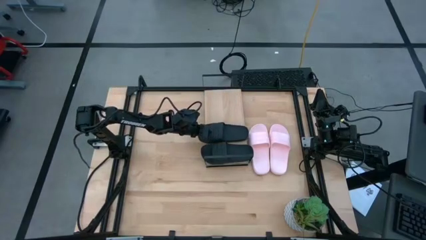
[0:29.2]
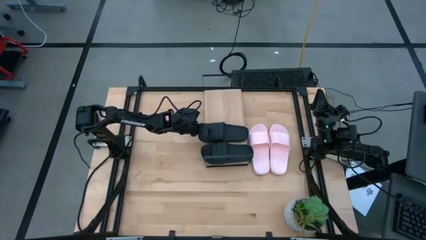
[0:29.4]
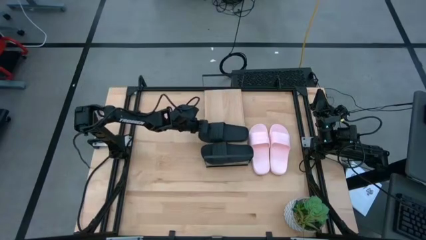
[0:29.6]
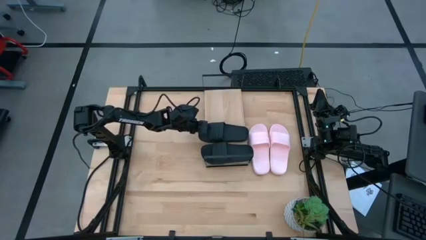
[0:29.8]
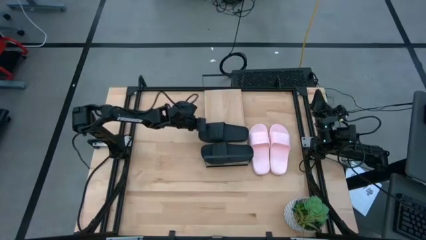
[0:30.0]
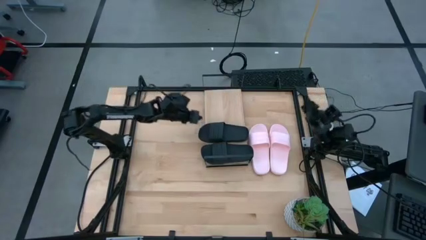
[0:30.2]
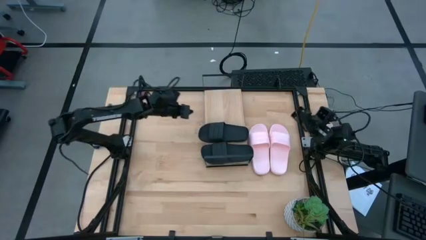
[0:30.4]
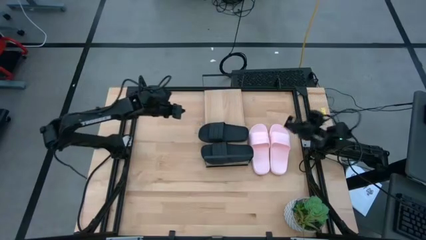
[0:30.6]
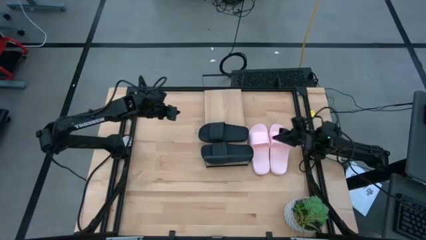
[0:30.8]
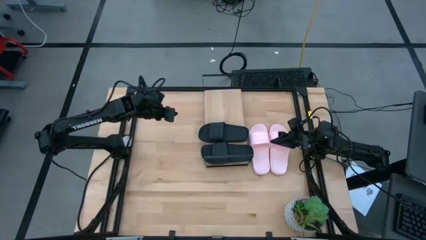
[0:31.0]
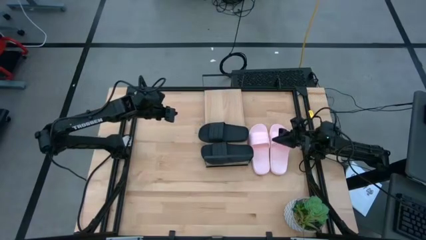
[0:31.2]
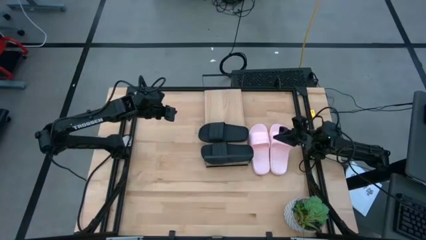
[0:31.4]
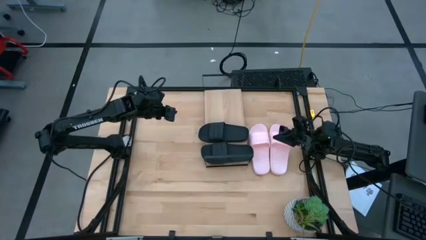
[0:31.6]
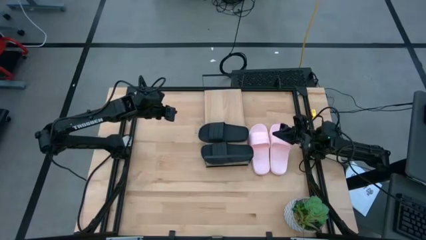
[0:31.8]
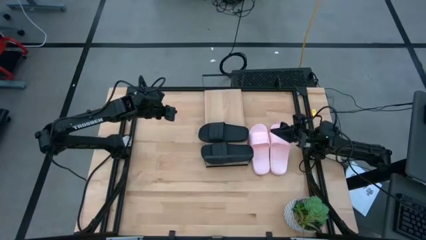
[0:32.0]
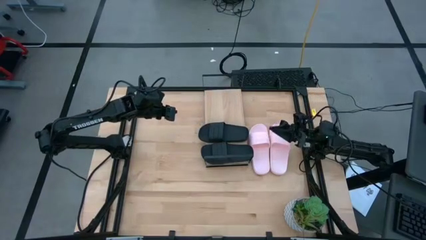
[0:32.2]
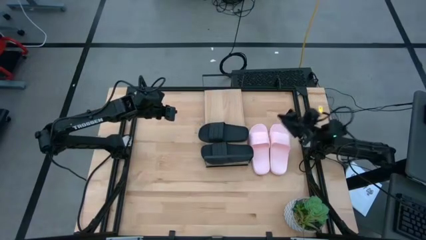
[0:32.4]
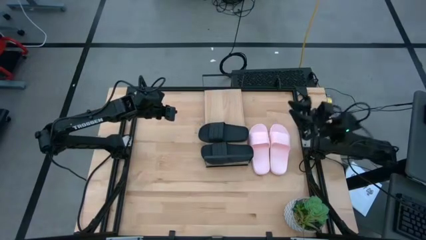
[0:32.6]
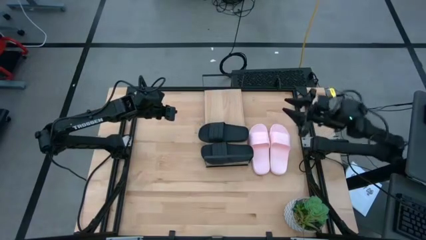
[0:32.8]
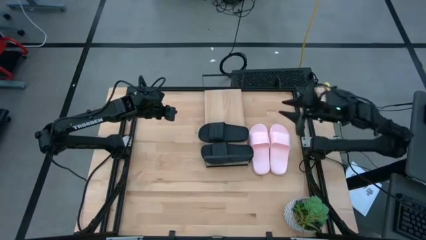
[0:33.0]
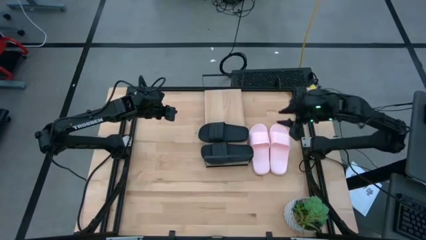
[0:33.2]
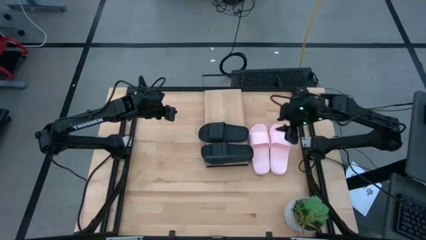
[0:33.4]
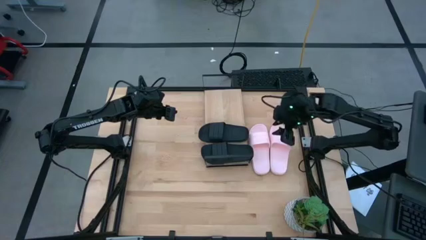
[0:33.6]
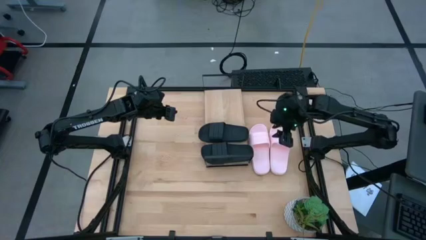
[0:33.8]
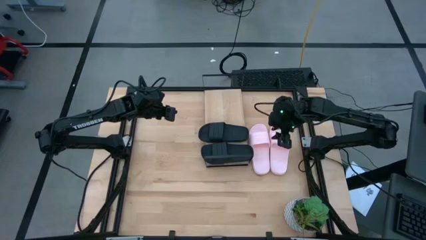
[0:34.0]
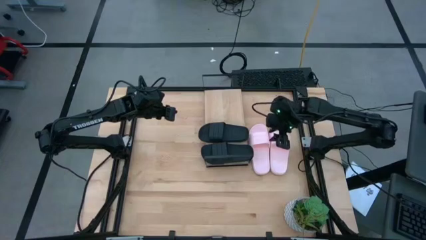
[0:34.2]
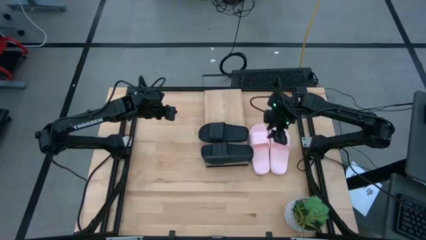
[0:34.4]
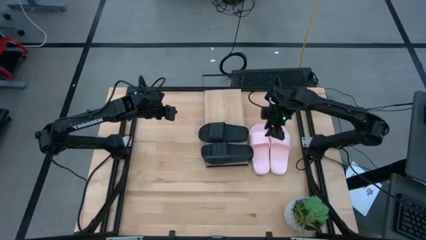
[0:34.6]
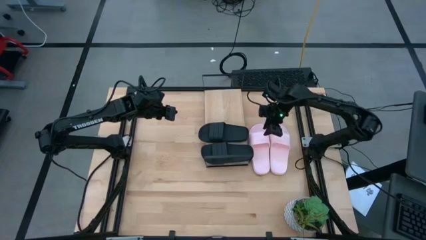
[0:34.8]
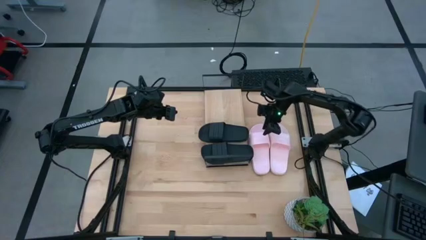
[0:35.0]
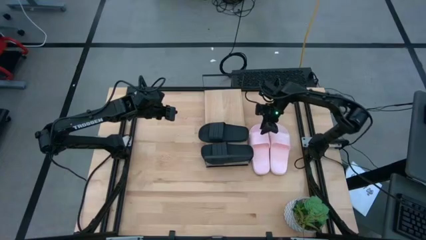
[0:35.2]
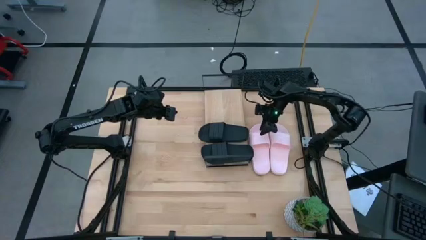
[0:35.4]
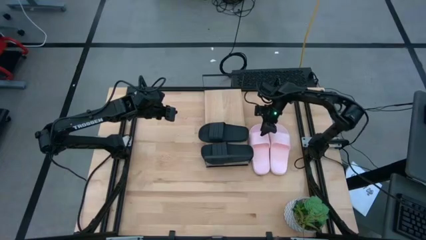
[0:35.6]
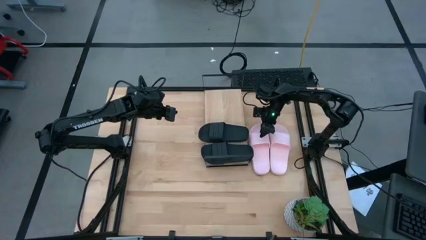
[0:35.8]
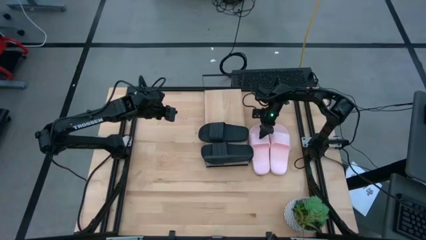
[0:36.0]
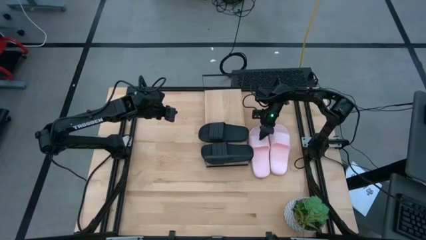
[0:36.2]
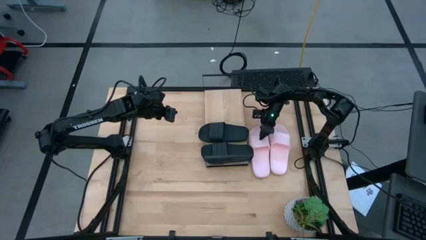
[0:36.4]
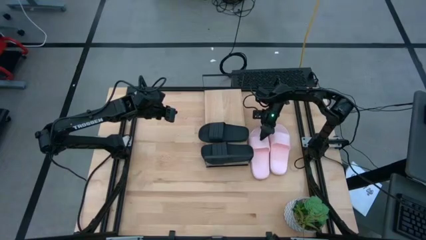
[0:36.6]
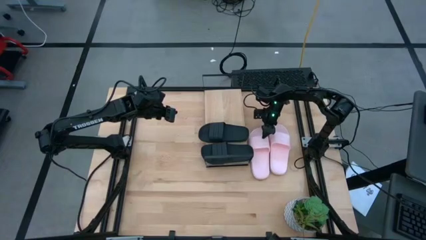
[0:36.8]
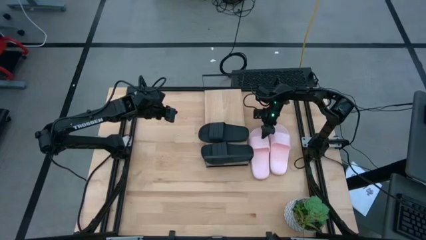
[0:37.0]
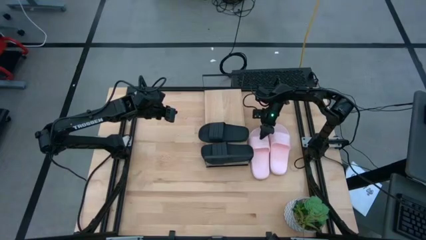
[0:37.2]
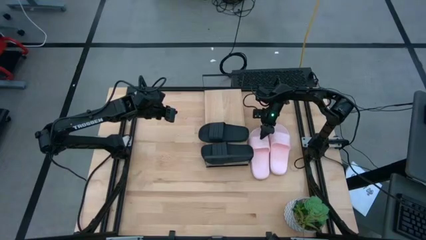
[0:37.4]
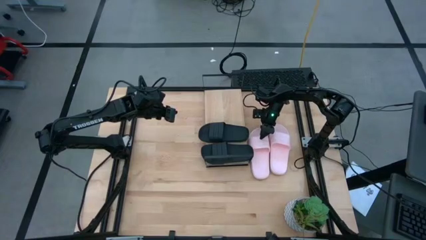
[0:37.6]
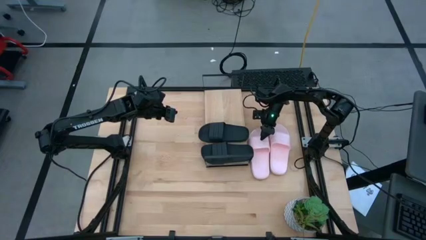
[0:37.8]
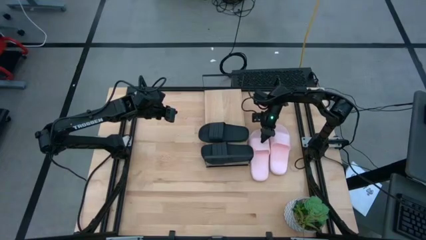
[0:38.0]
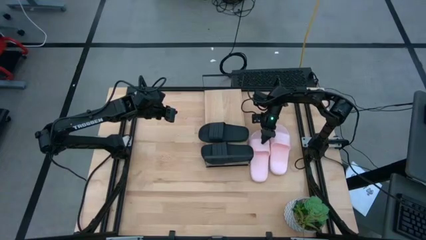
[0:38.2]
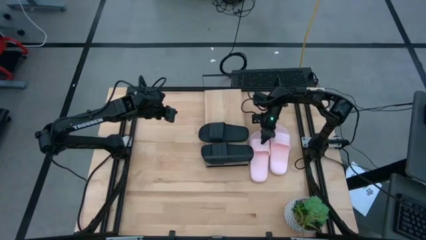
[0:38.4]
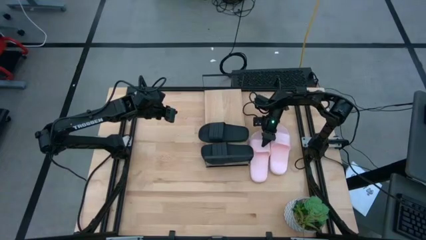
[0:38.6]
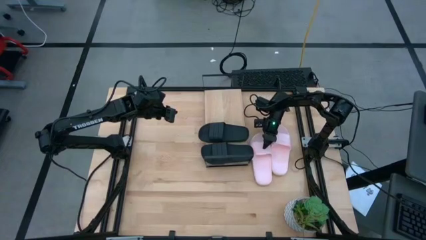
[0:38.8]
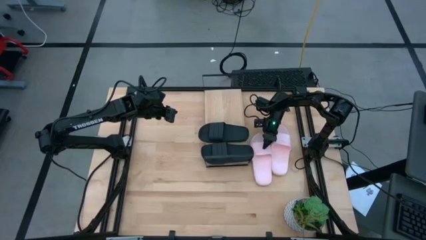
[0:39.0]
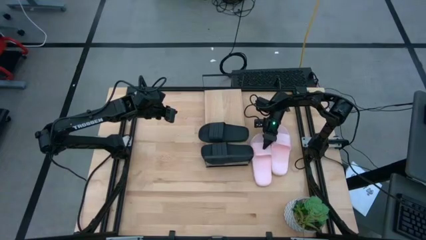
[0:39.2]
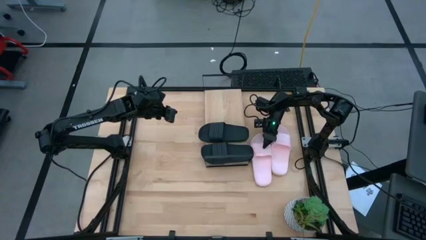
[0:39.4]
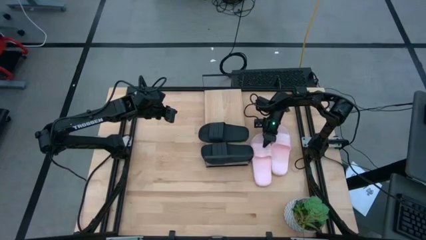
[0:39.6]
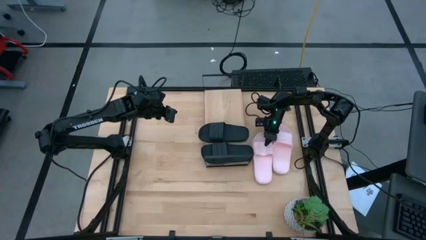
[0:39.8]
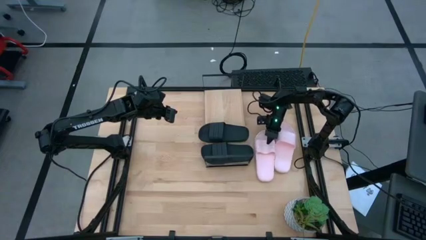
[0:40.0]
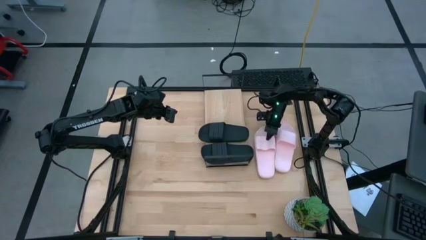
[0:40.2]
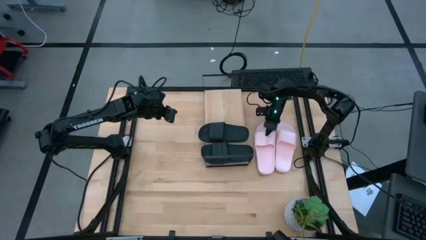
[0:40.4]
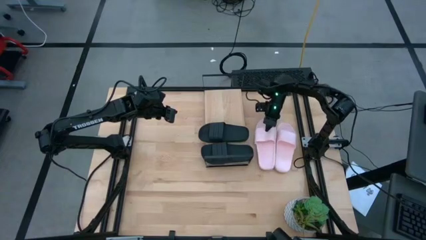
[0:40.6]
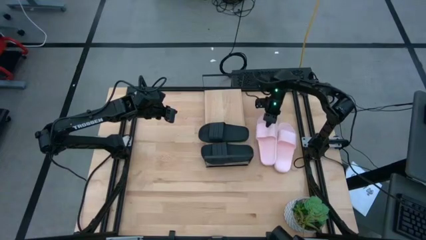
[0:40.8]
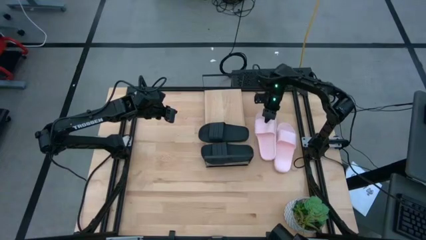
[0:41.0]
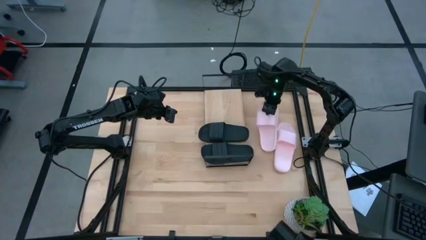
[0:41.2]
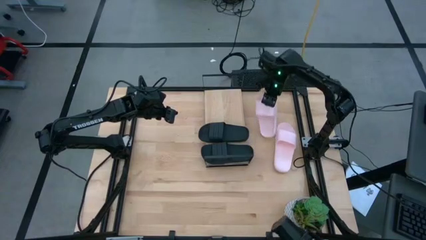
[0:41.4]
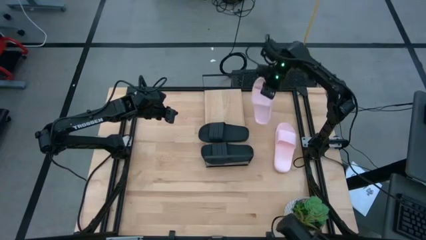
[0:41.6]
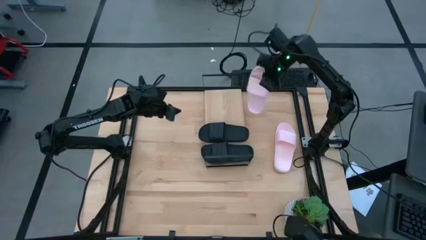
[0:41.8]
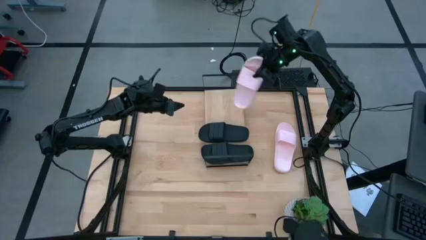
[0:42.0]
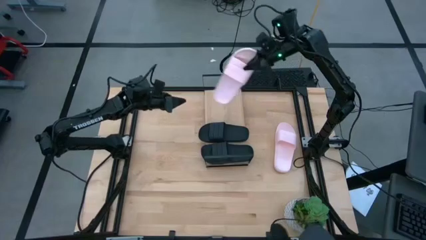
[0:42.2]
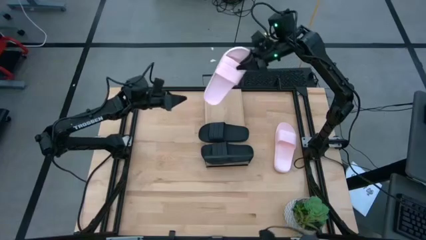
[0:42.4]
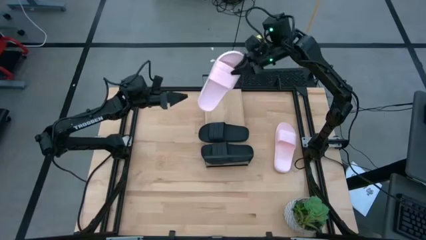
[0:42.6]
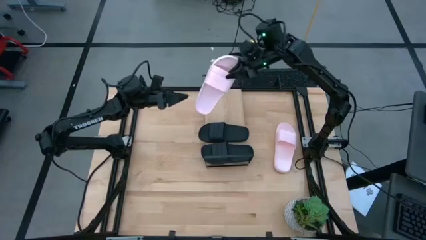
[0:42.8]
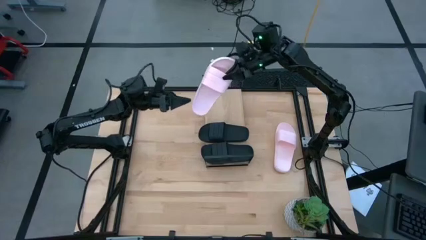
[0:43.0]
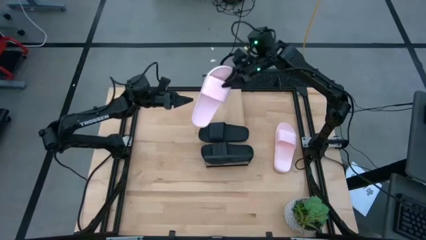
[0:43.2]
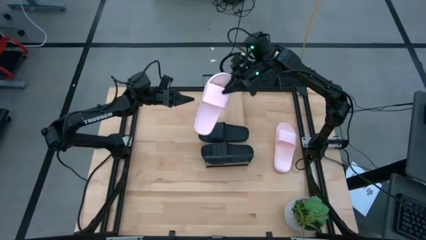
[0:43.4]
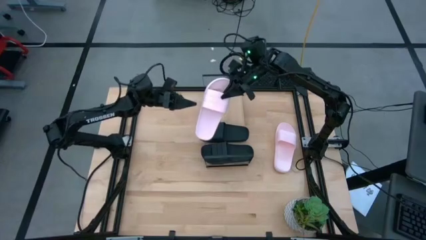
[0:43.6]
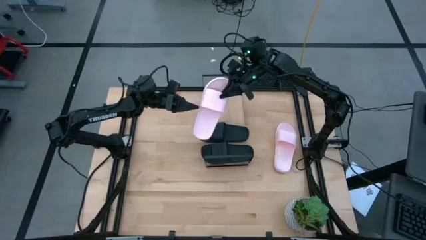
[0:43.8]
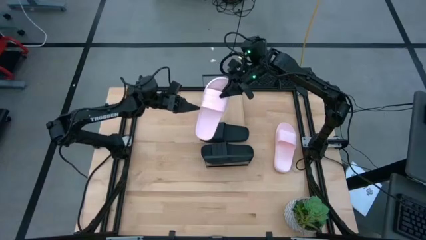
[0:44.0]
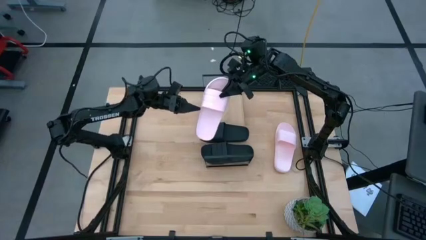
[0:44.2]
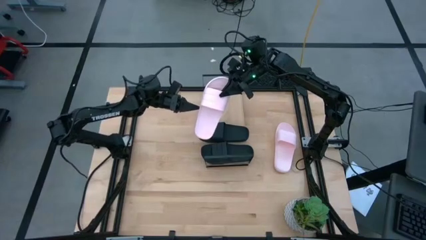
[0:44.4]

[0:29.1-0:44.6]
Task: Pick and place slides into the shelf
Put the left pink slide on the shelf
